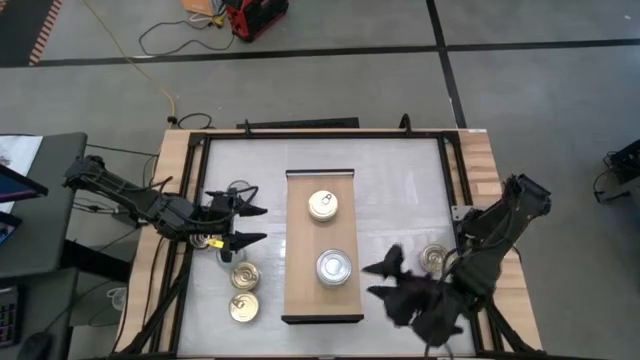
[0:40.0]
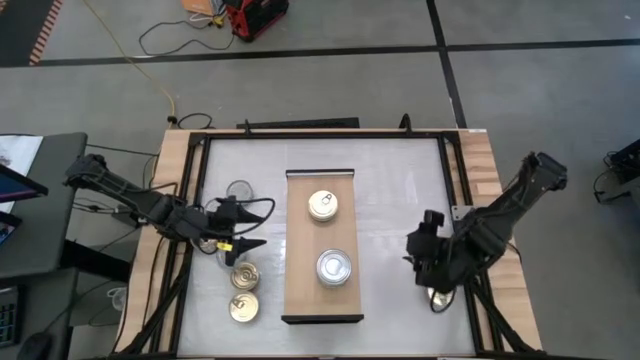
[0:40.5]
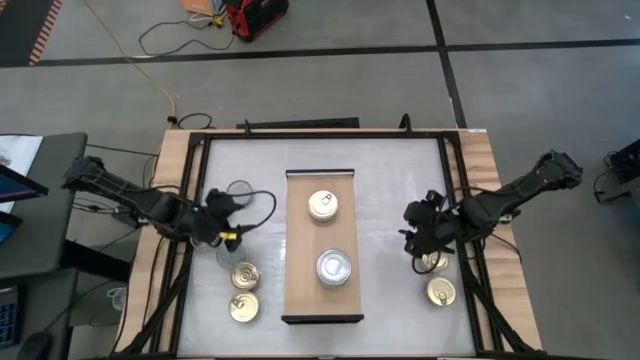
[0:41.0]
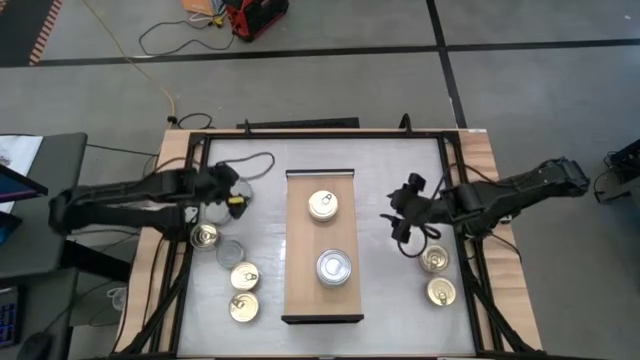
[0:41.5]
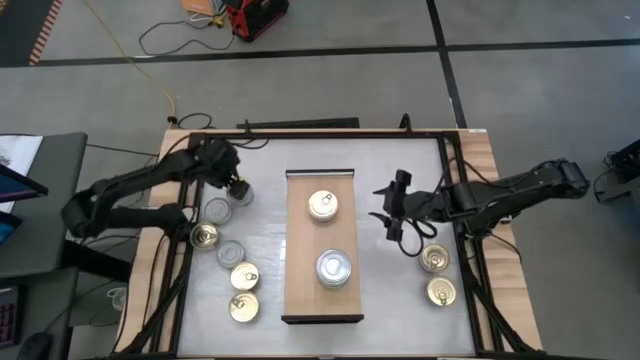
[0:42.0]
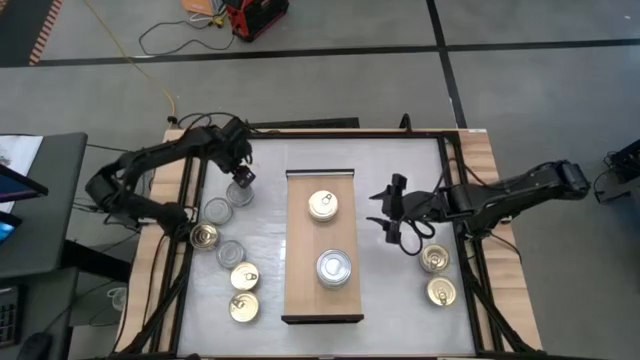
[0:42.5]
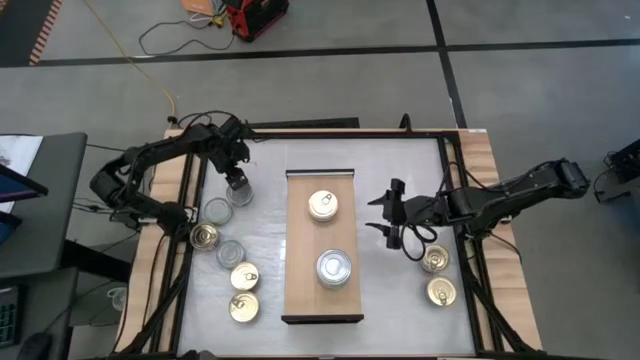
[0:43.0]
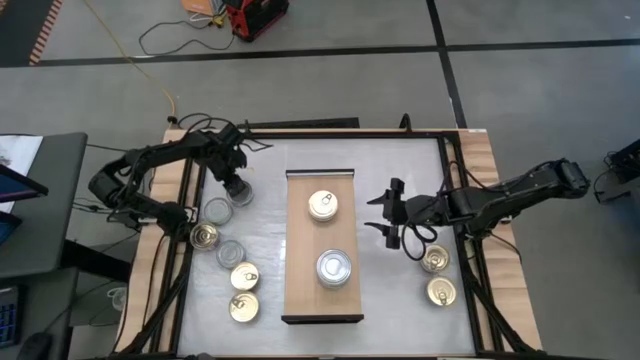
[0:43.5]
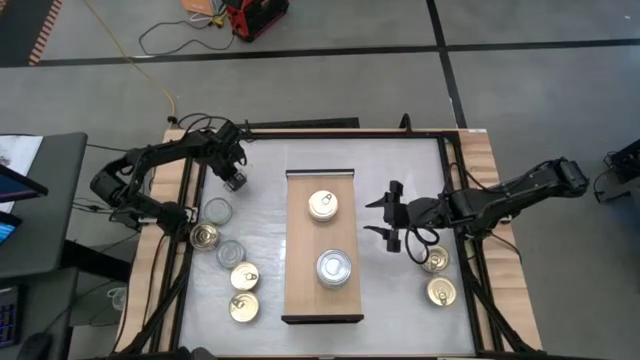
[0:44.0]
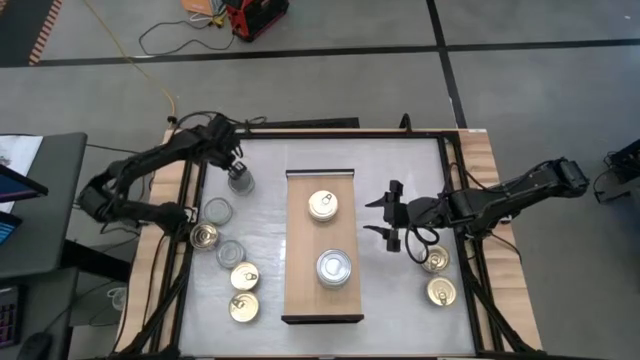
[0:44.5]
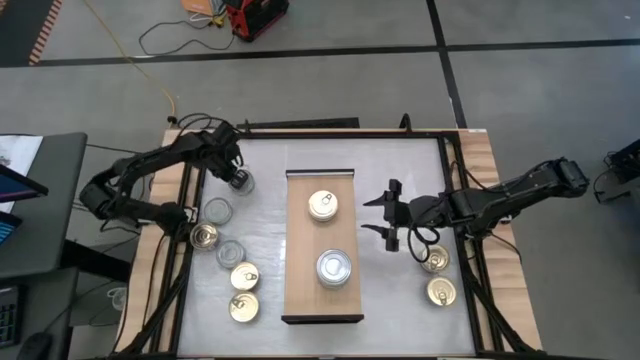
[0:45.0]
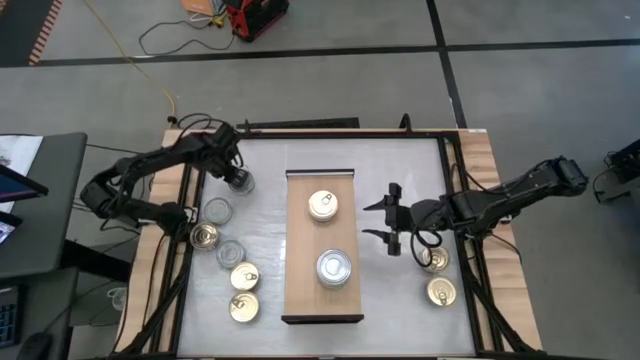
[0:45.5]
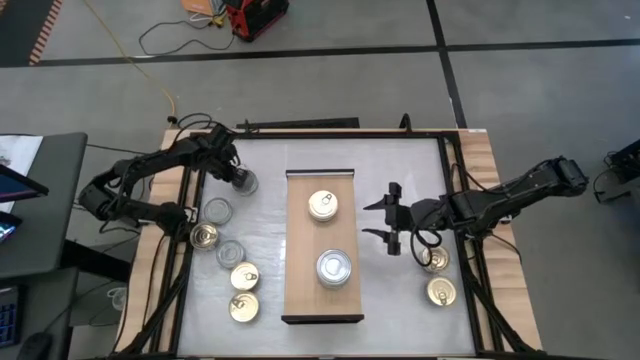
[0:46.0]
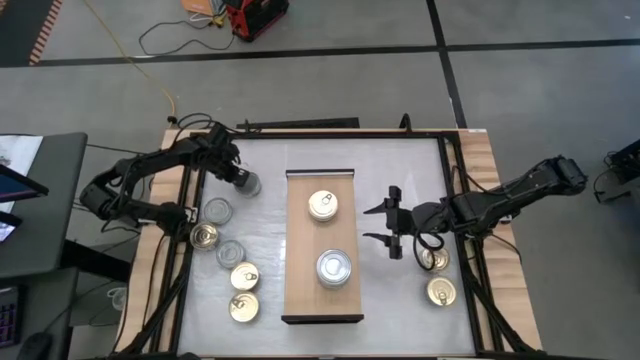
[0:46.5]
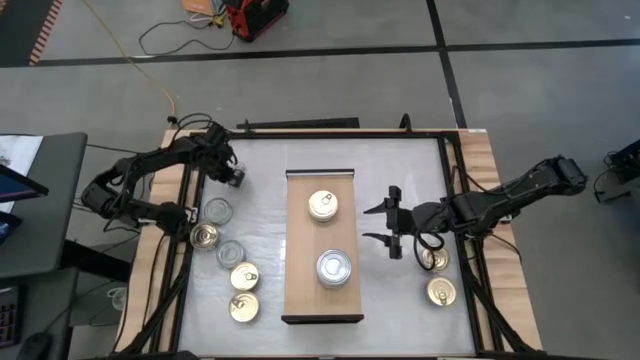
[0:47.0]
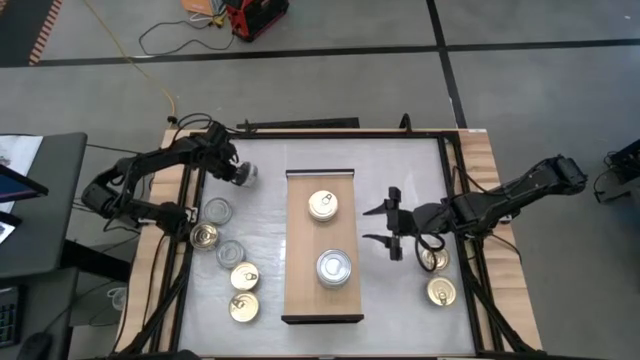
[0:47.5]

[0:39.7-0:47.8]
Task: Stack canned seafood by type on shelf
Stack the green tuna can on top of the stacked green tuna cans on the shelf

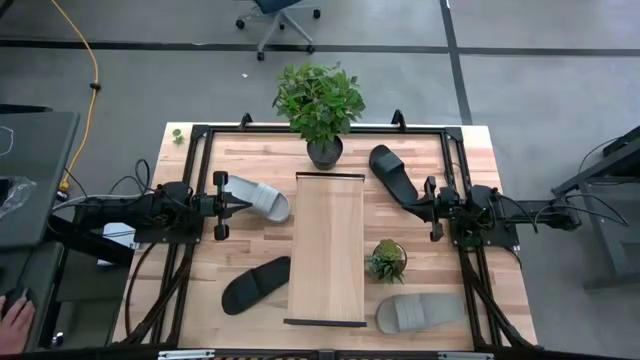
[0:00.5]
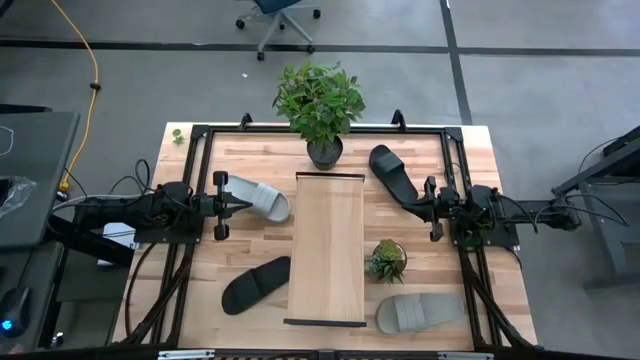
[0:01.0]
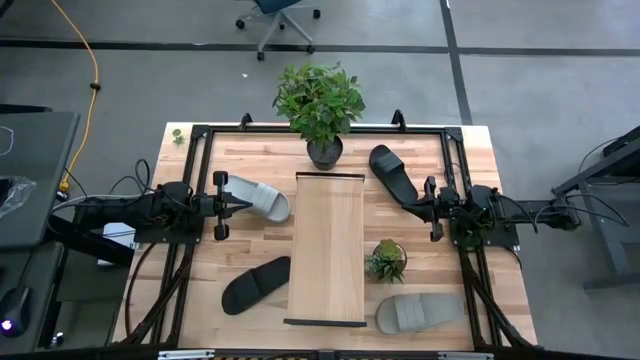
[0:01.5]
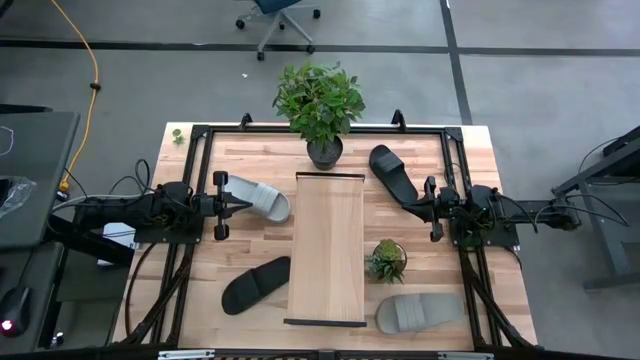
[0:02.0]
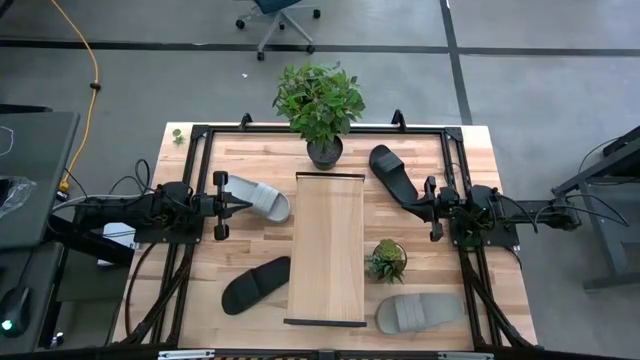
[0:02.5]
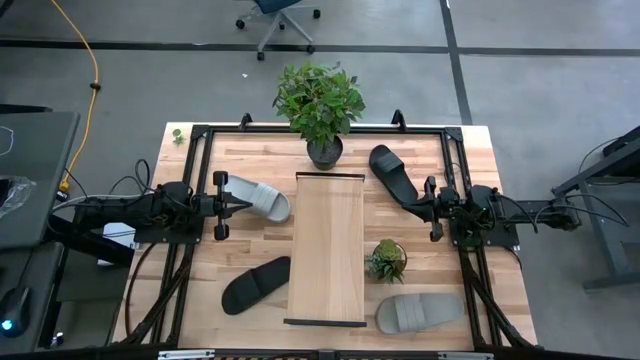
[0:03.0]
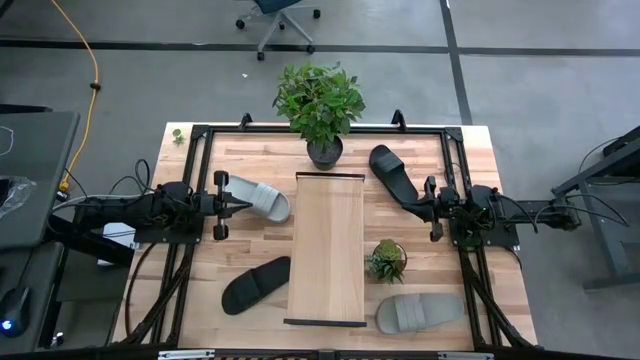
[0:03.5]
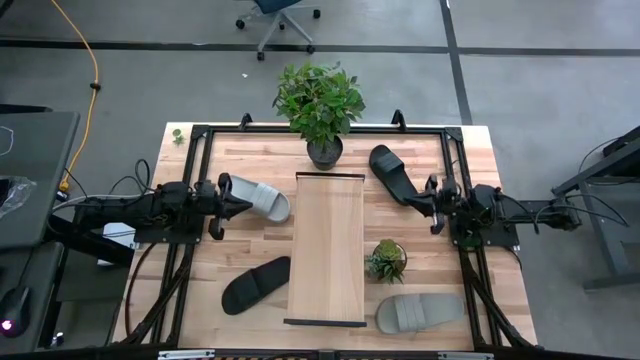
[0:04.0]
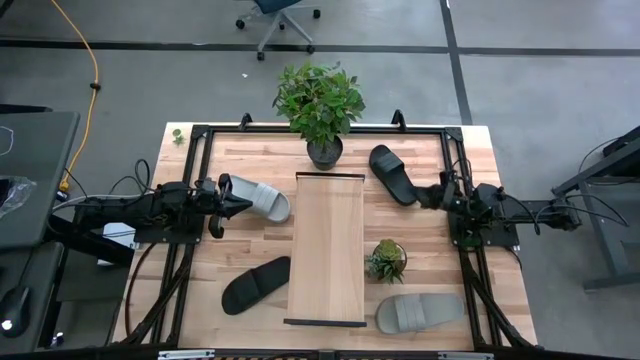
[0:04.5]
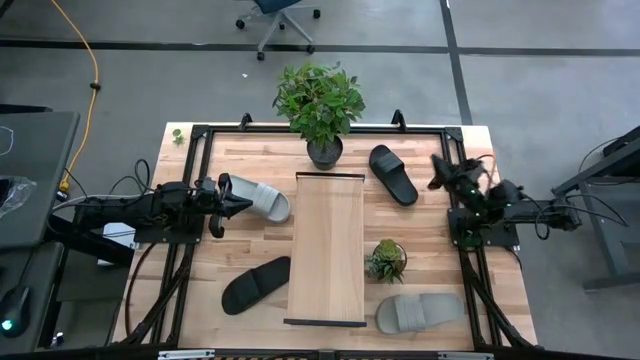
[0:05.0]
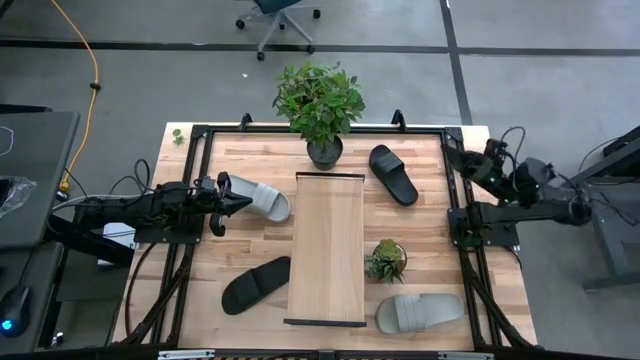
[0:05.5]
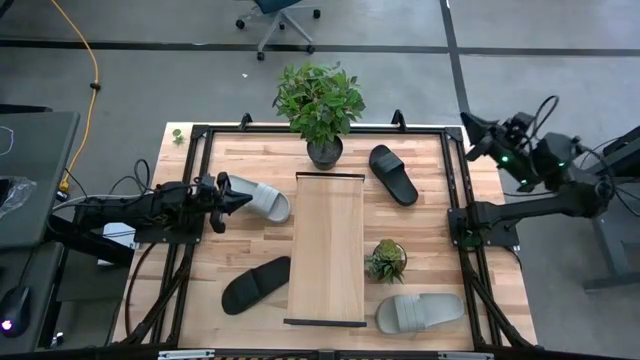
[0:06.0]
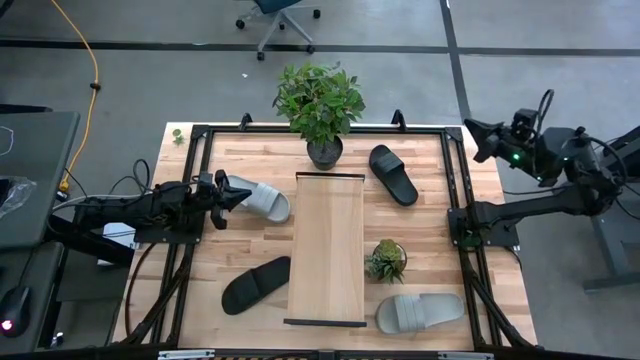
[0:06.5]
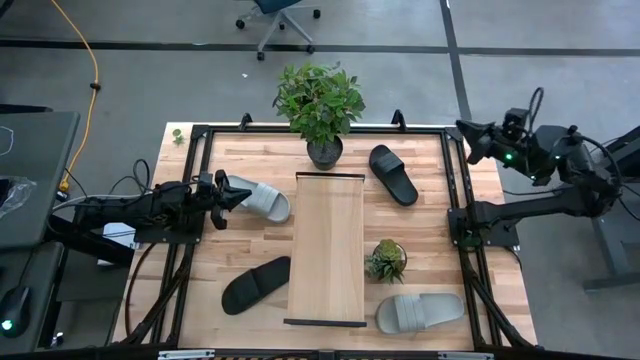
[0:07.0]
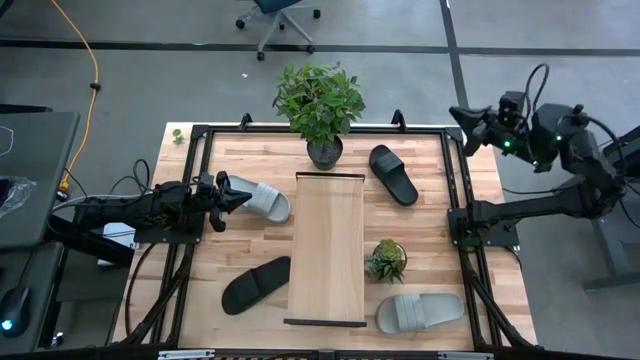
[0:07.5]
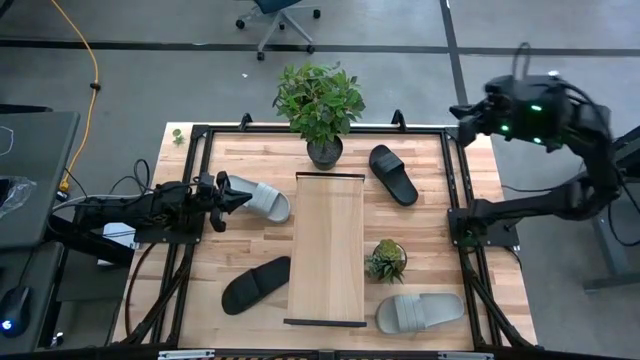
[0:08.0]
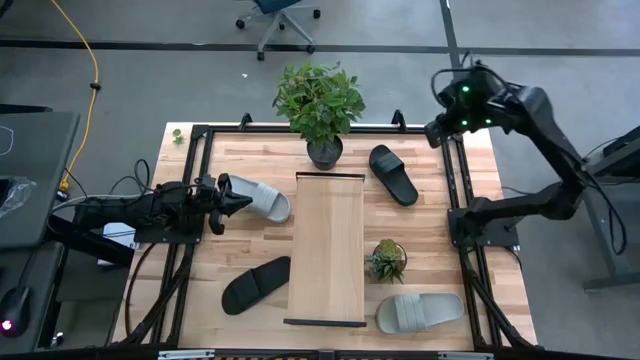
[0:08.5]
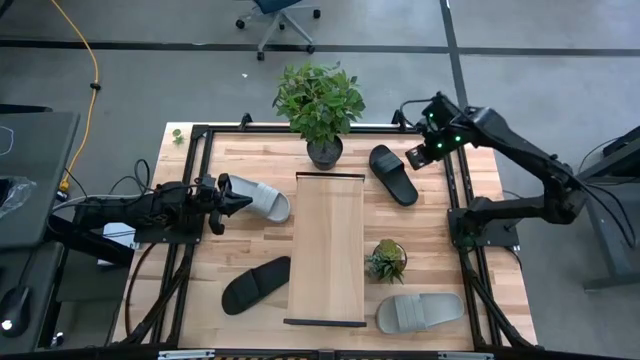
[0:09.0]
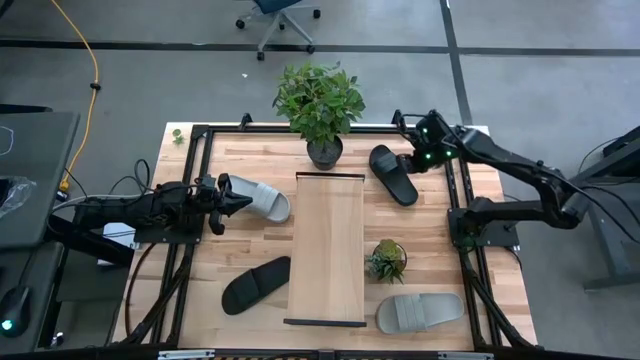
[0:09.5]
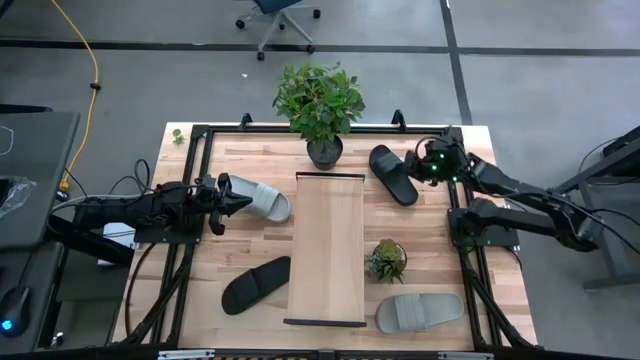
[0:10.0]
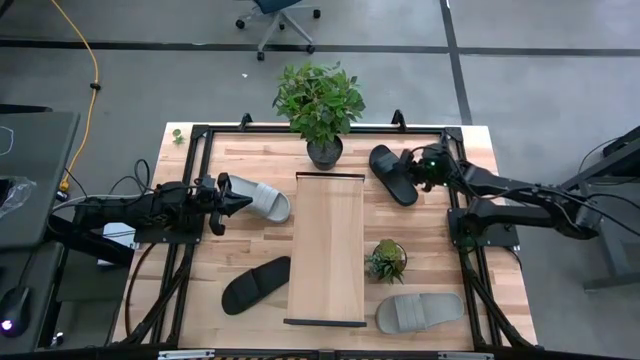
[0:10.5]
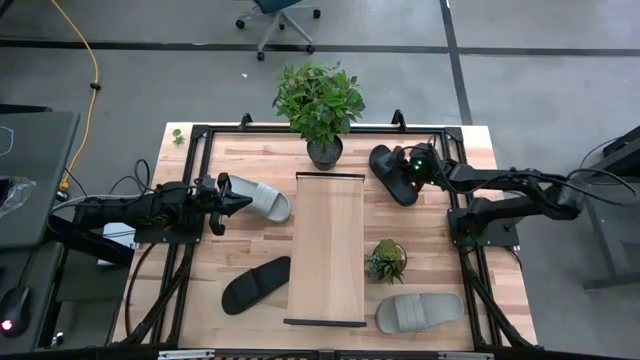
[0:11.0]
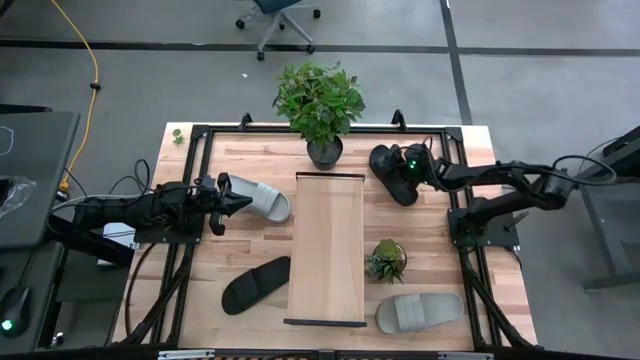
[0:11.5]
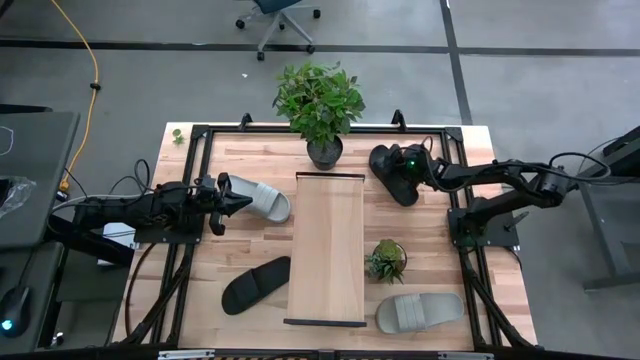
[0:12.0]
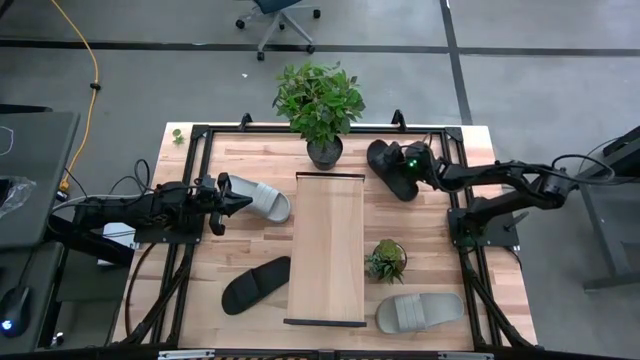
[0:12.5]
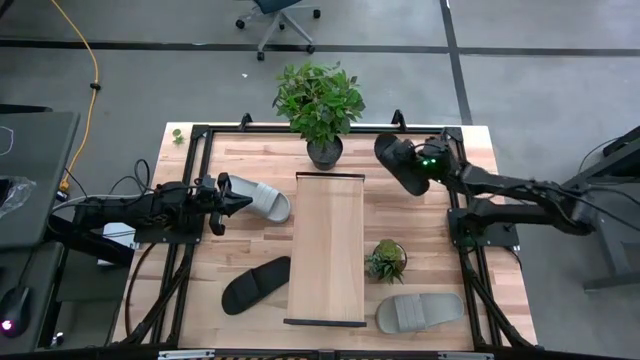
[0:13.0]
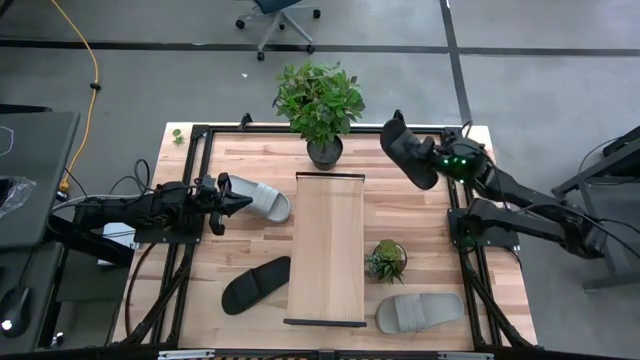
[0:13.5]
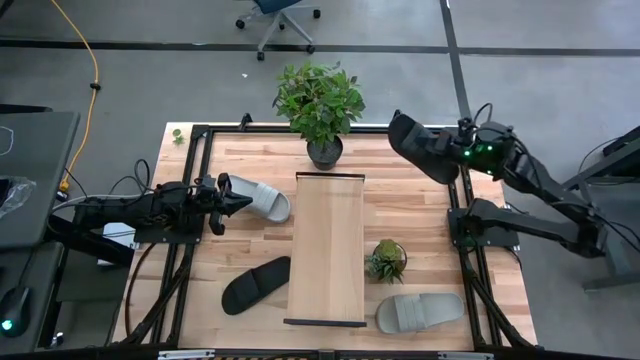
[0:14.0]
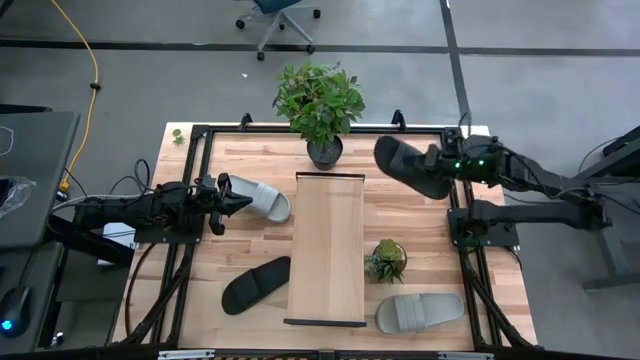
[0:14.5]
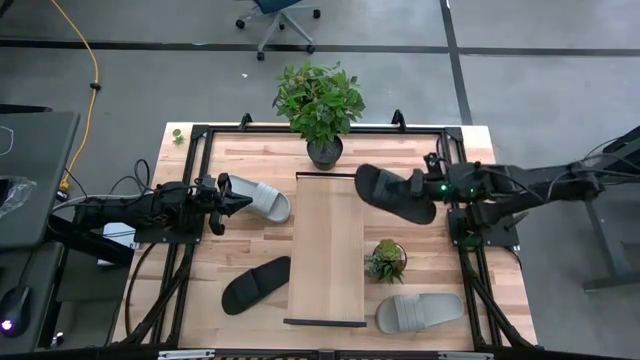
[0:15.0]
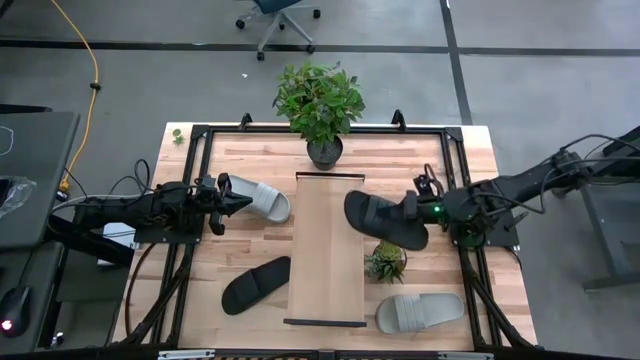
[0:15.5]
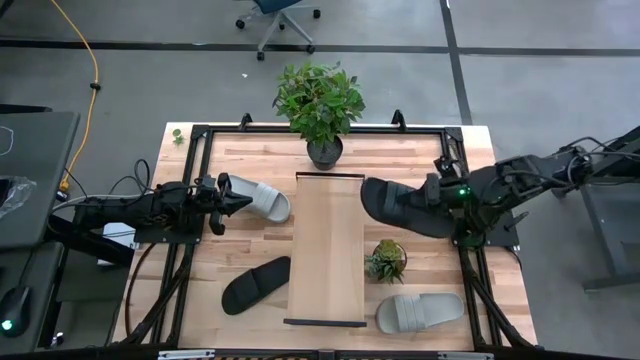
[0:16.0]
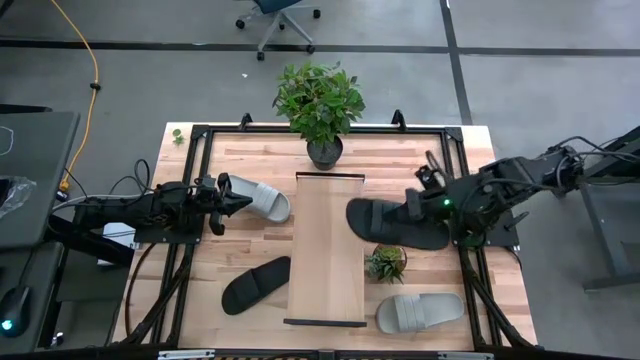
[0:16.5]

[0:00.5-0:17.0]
Task: Pick and place slides into the shelf
Put the top black slide into the shelf
